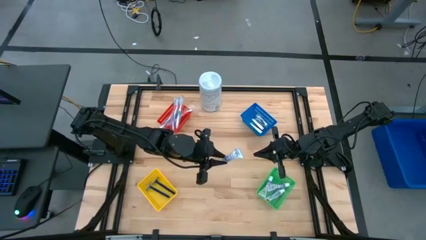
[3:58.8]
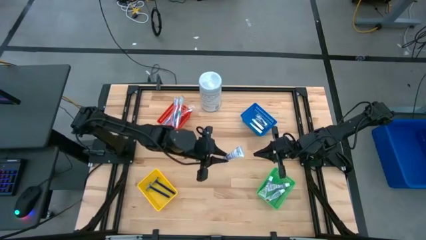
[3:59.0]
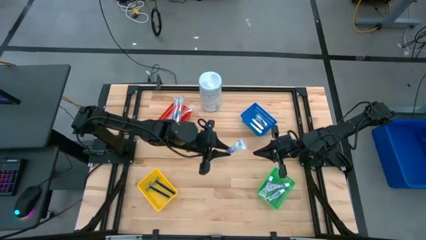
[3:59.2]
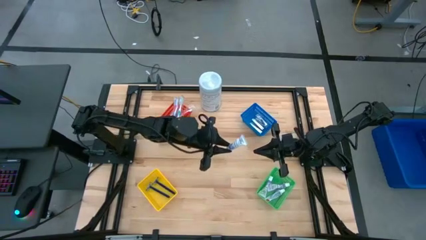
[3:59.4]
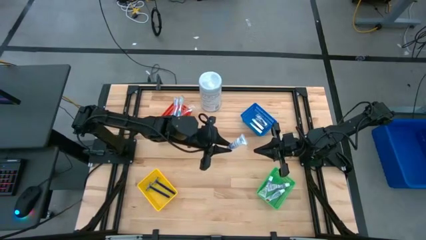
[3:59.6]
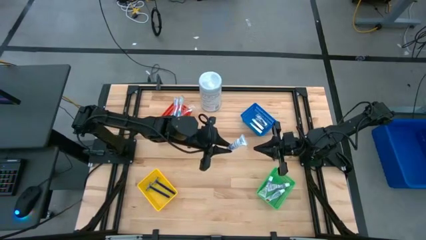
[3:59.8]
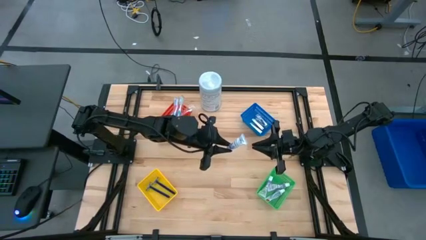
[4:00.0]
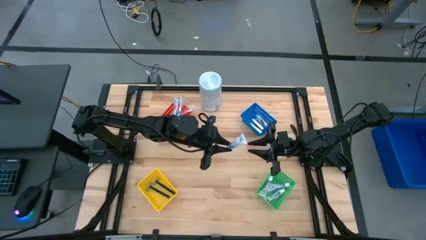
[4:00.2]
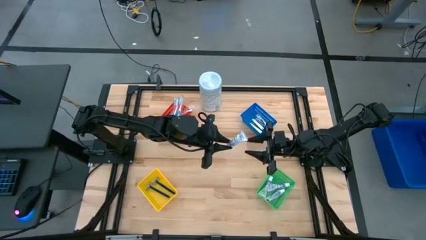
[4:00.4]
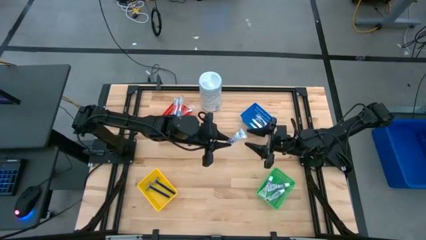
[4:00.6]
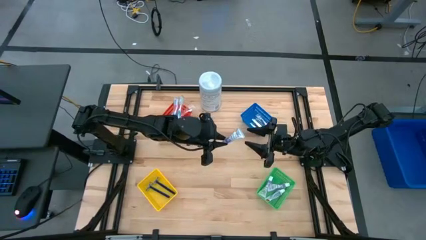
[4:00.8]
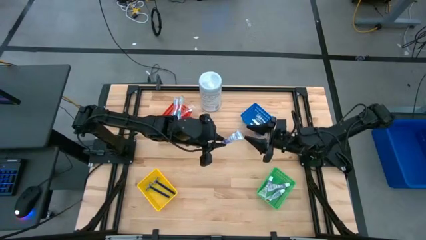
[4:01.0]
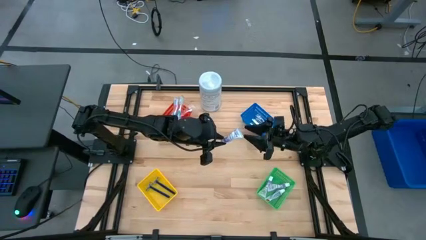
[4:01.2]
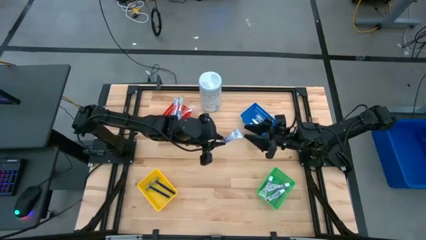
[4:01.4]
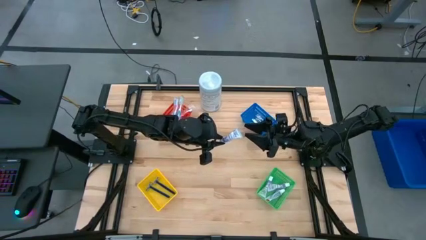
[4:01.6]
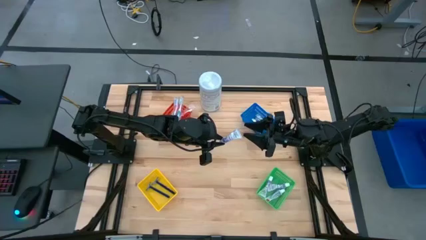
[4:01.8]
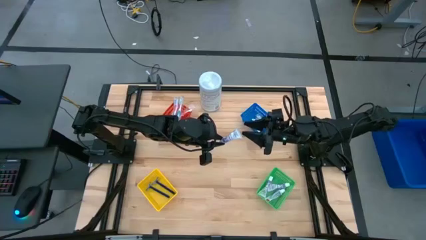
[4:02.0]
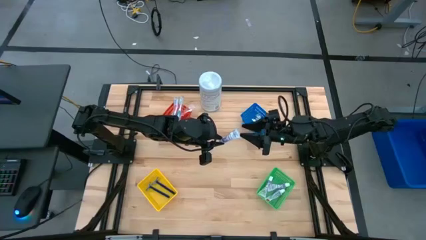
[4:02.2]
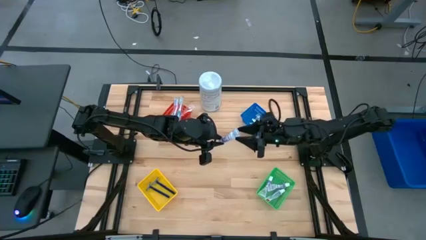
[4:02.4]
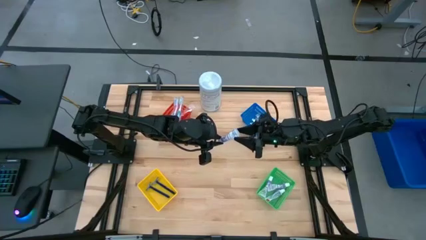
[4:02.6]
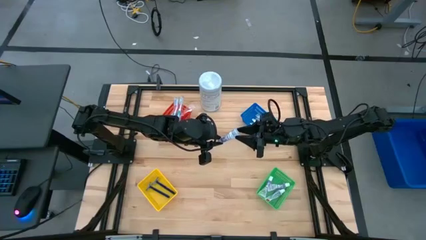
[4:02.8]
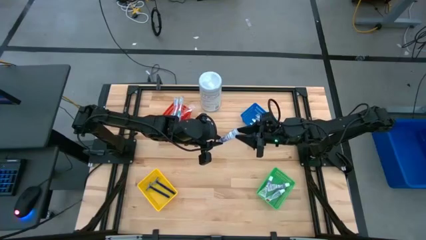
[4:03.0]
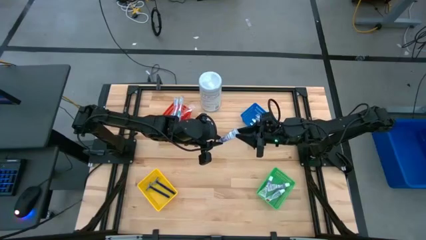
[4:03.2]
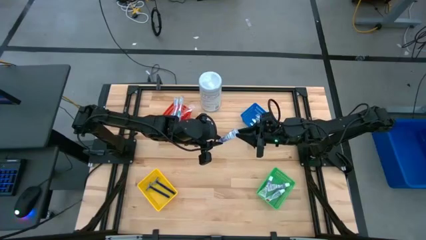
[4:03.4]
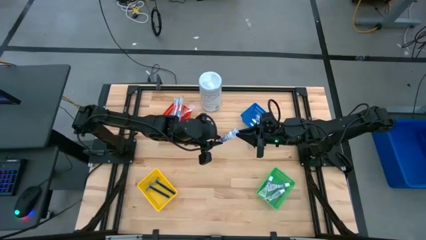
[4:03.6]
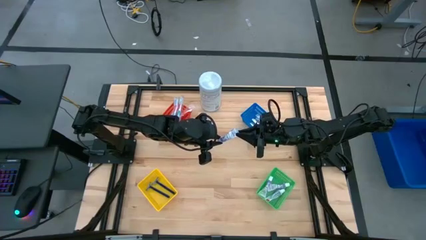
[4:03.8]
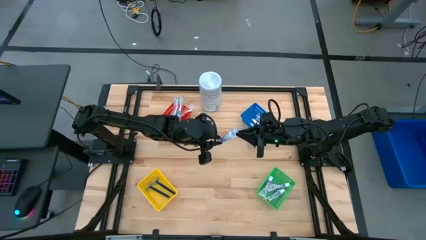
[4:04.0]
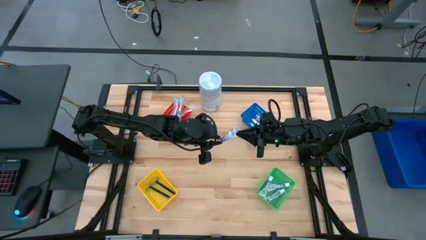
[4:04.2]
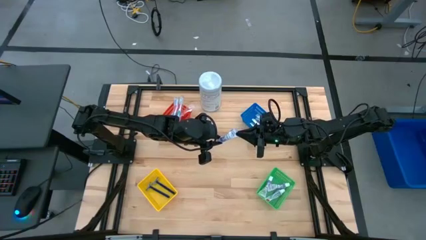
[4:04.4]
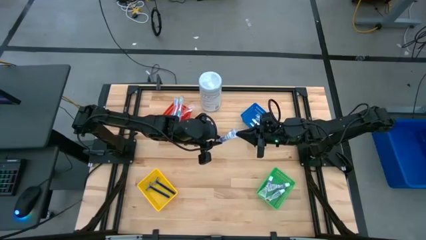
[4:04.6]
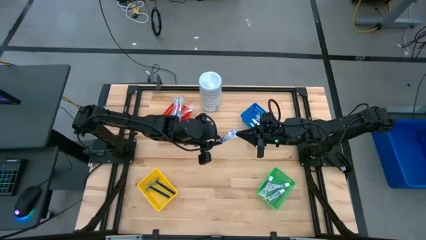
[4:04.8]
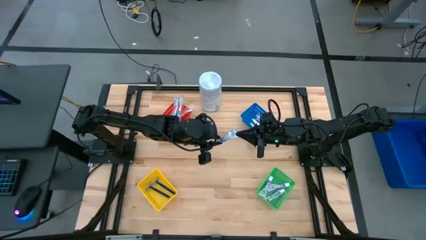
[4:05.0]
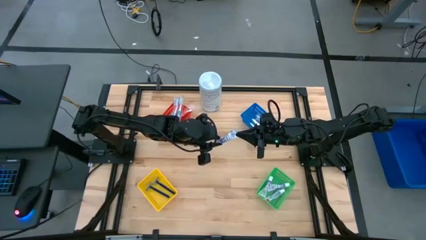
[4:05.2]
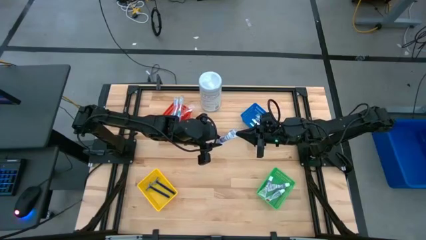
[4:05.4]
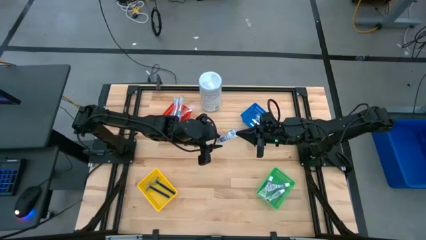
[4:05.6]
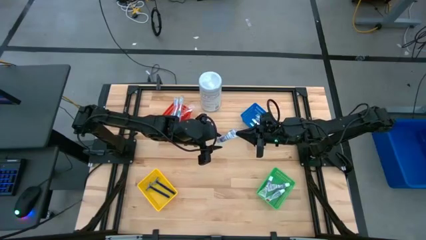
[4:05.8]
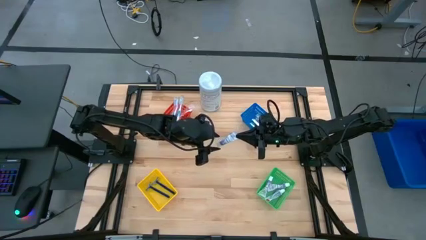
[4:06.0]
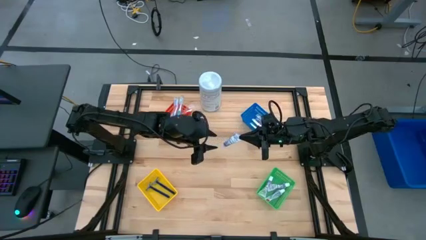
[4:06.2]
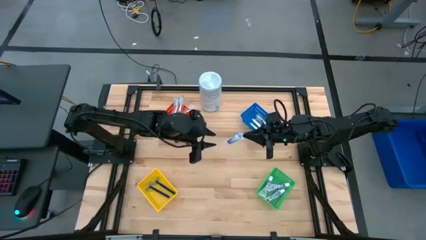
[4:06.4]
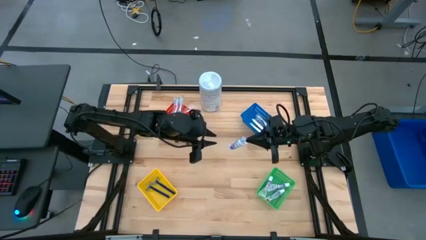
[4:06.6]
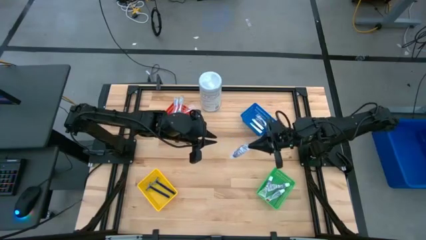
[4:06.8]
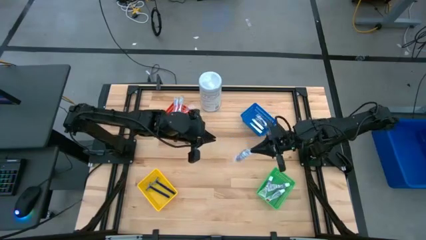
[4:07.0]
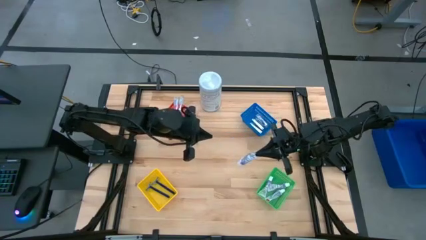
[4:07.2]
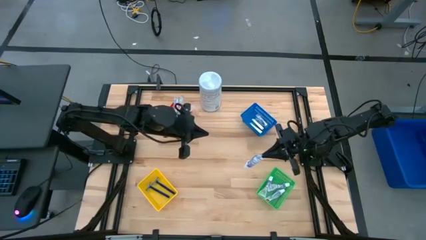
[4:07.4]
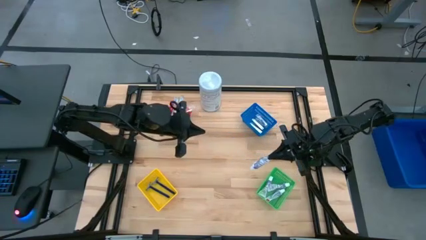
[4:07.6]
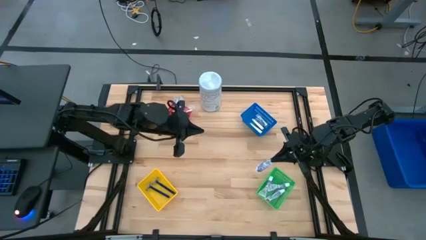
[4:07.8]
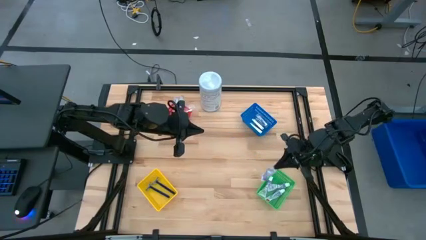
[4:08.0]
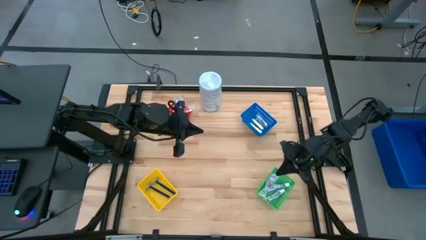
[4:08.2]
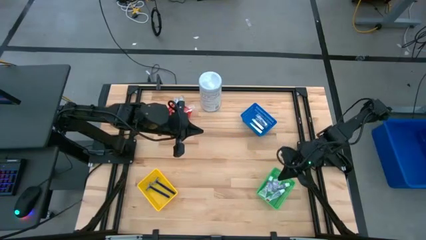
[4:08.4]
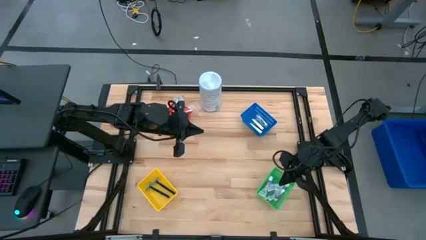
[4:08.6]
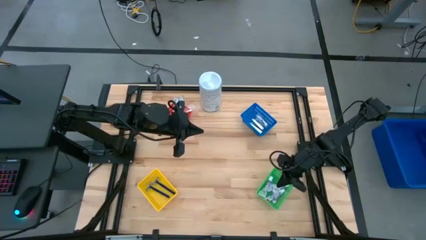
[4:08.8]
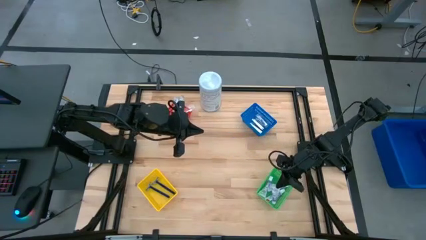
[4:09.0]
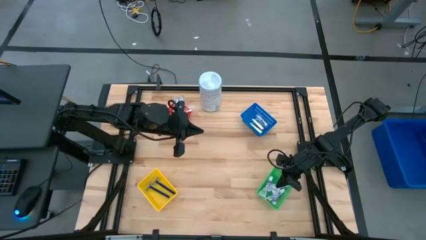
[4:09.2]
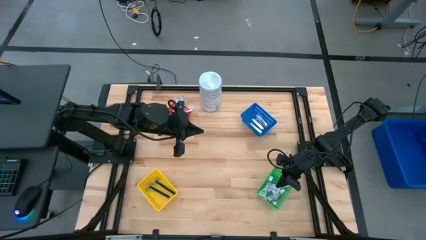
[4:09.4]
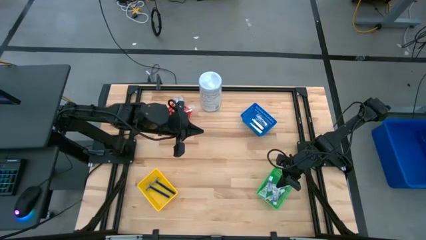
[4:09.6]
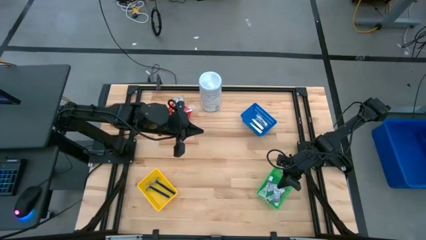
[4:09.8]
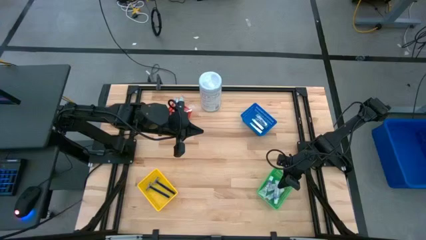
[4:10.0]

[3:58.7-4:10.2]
Task: Pick & Place Travel size toiletries
Put the white toothpaste into the green basket

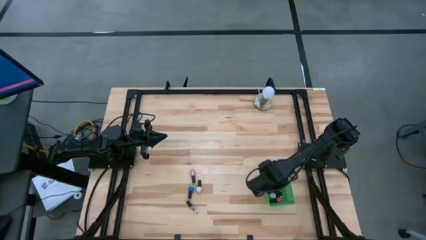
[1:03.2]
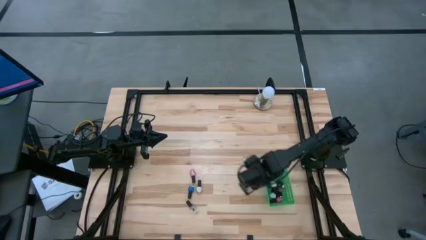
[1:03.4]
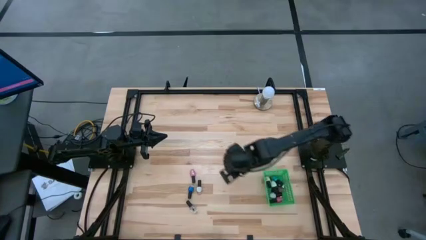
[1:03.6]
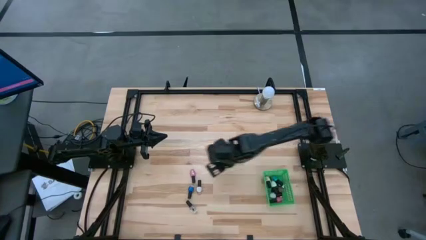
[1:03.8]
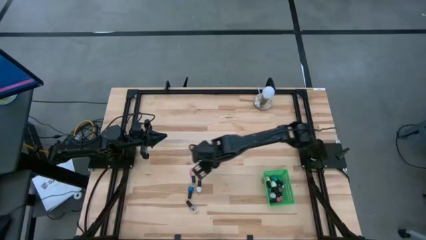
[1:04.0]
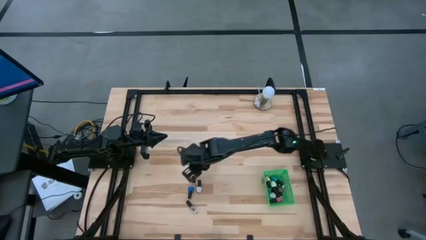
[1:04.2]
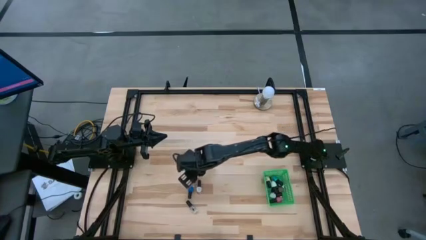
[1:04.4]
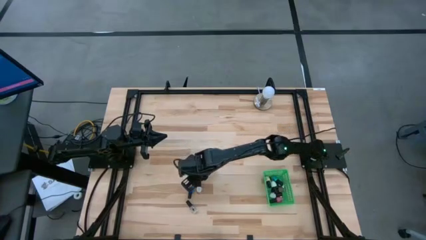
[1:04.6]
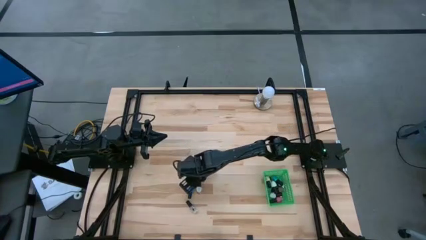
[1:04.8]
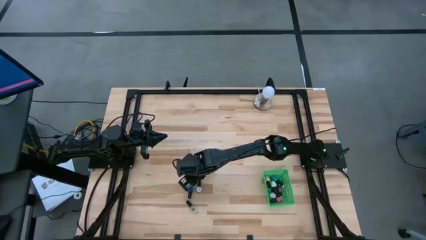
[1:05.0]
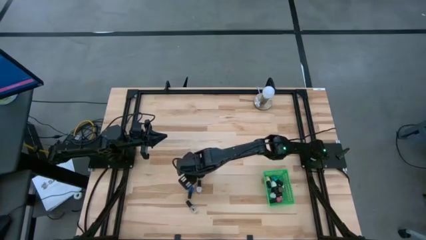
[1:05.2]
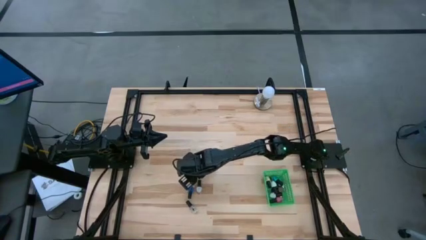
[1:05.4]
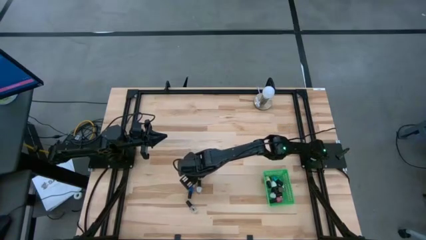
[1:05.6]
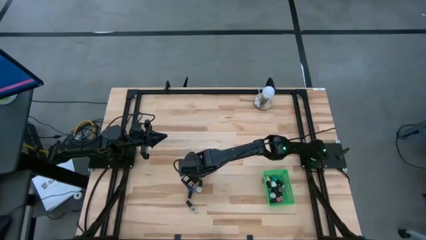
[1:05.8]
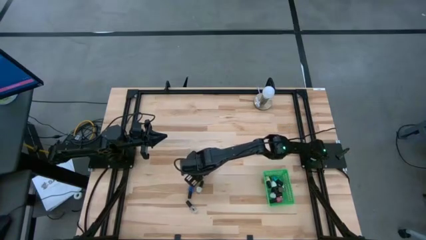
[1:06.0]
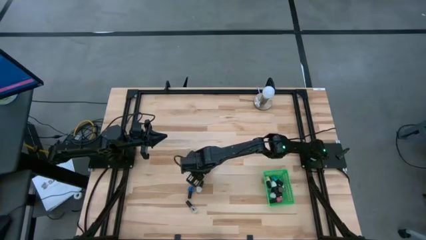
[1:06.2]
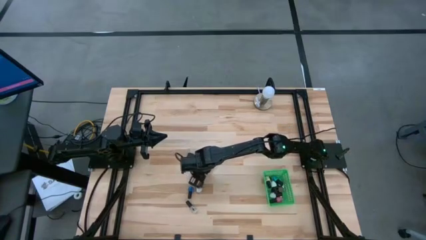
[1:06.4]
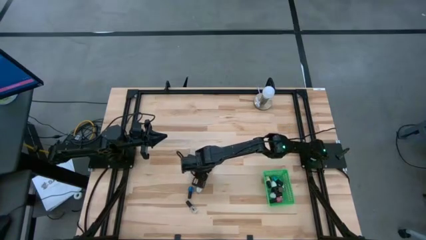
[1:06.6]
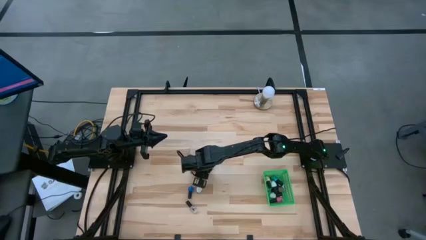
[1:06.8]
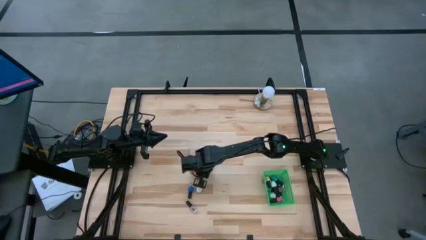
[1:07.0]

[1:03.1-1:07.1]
Task: Pick & Place Nail Polish
Put the pink nail polish into the green bin
